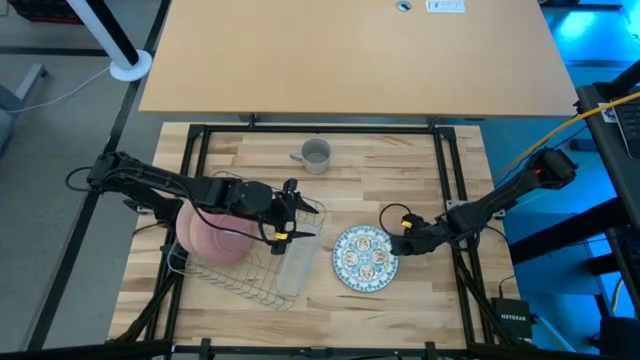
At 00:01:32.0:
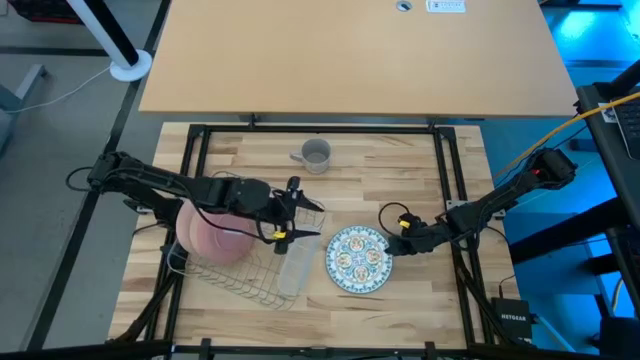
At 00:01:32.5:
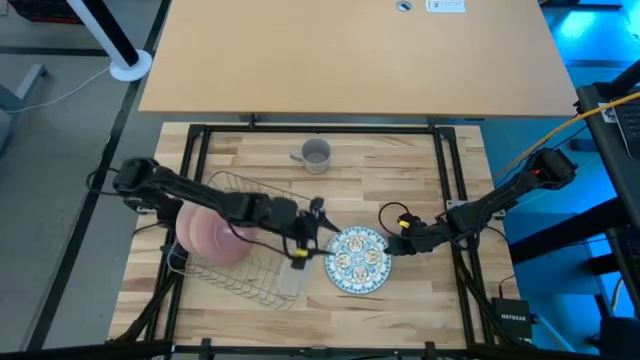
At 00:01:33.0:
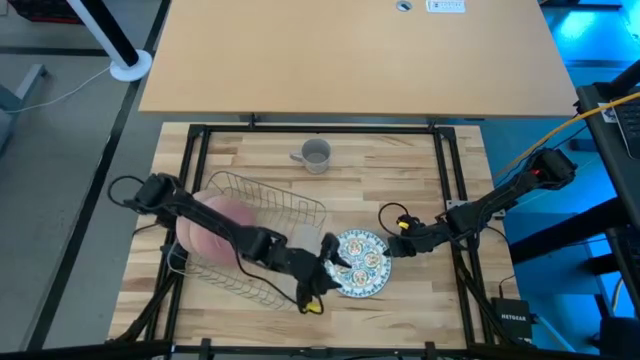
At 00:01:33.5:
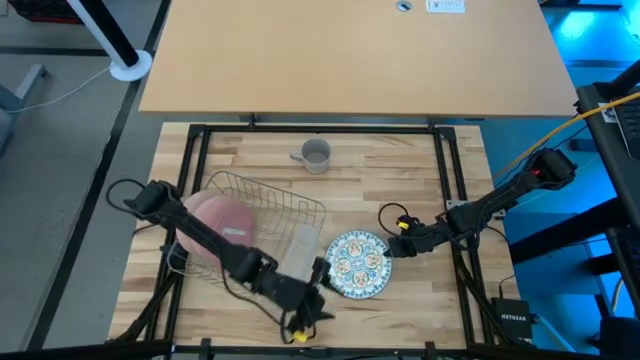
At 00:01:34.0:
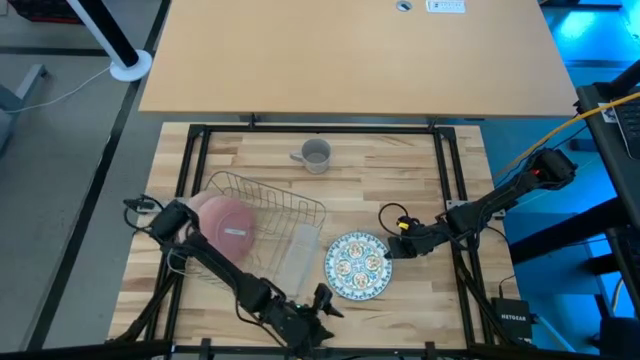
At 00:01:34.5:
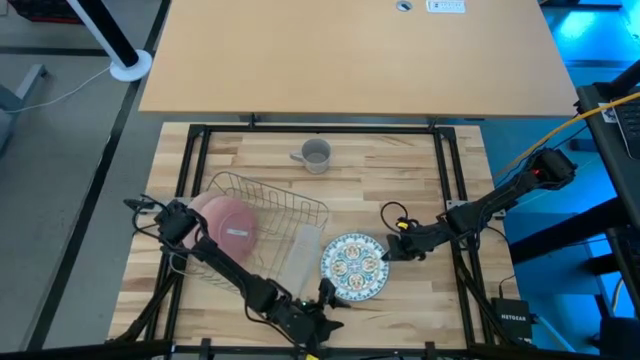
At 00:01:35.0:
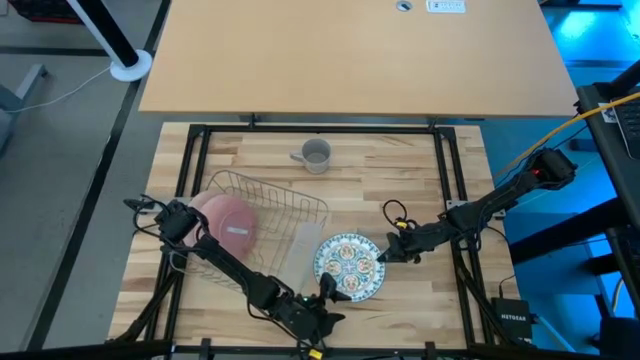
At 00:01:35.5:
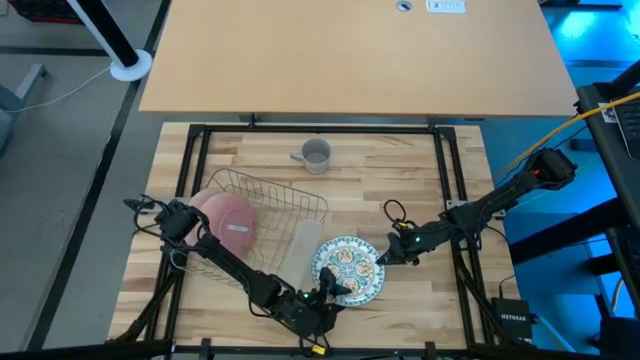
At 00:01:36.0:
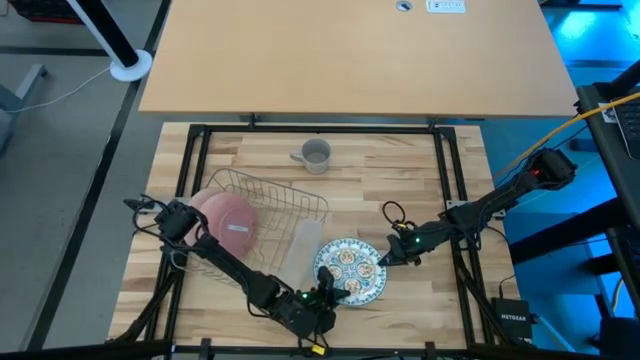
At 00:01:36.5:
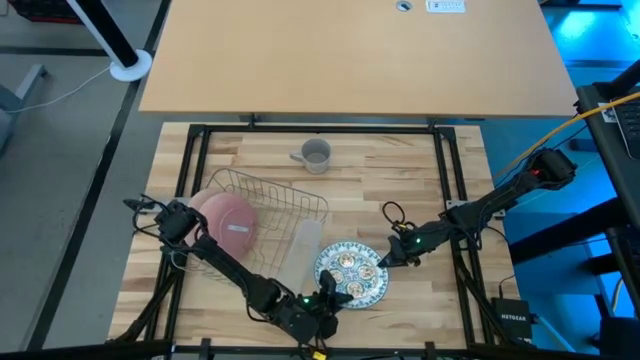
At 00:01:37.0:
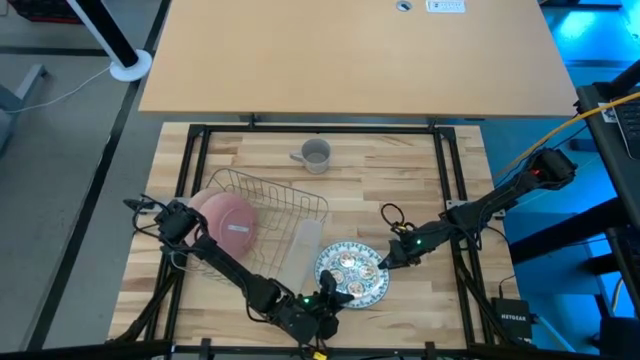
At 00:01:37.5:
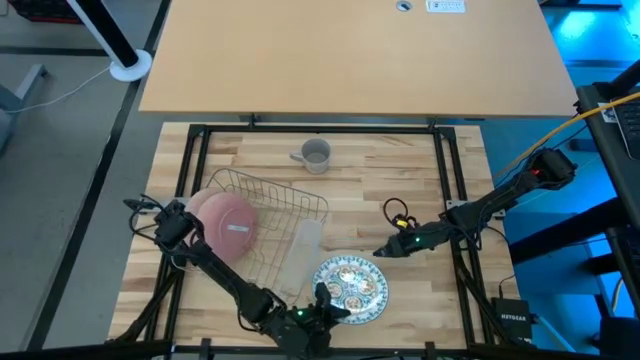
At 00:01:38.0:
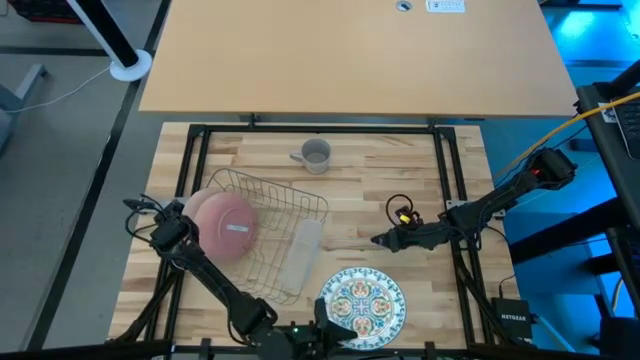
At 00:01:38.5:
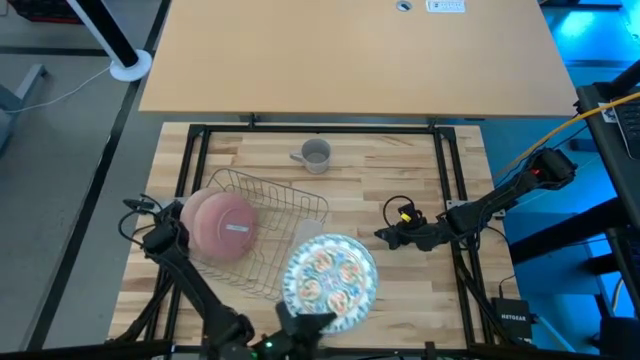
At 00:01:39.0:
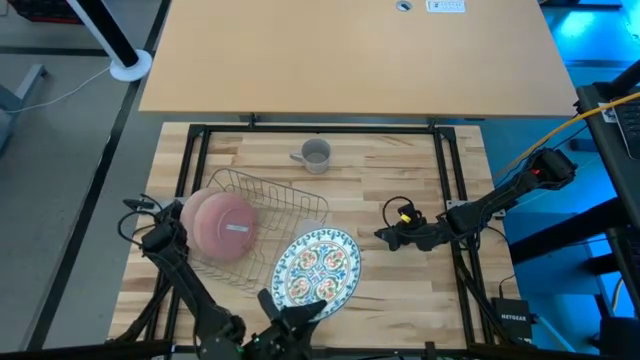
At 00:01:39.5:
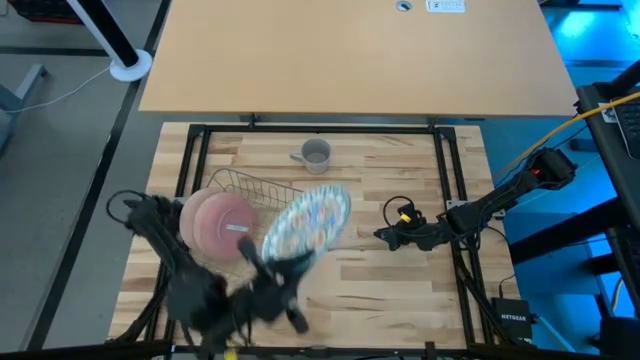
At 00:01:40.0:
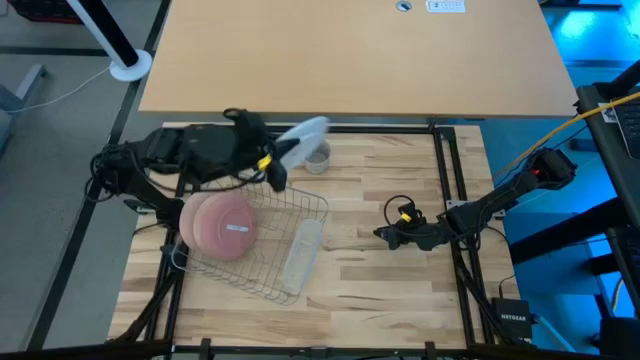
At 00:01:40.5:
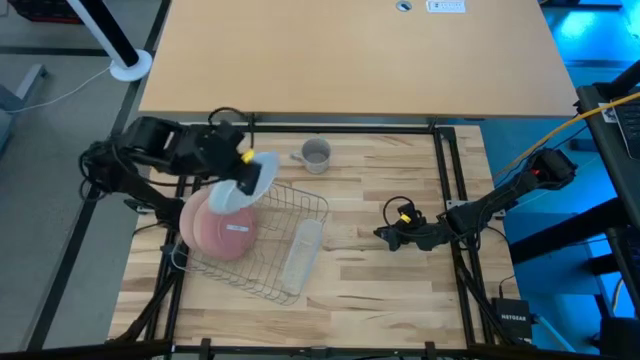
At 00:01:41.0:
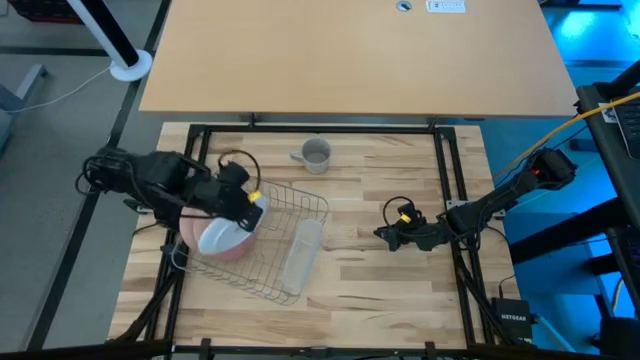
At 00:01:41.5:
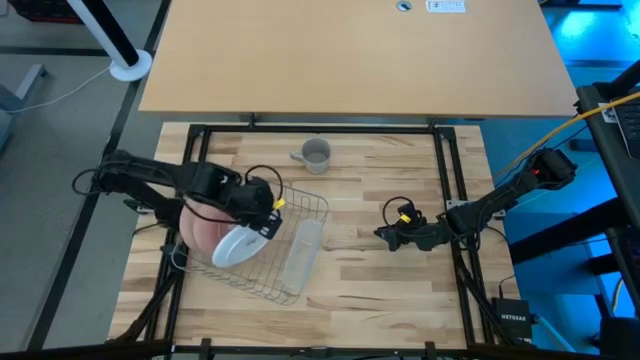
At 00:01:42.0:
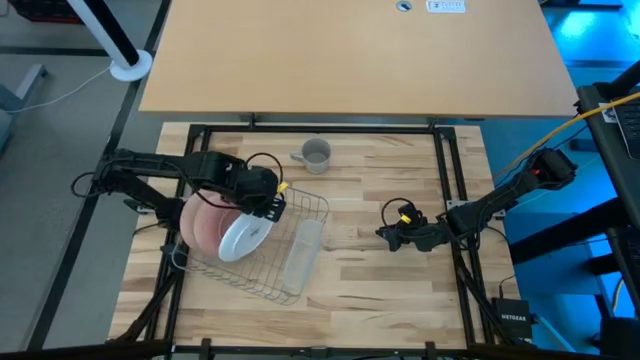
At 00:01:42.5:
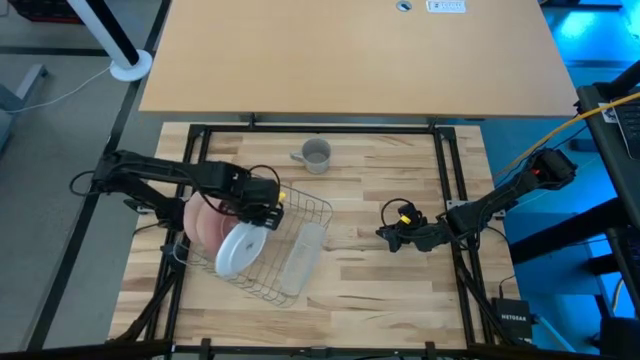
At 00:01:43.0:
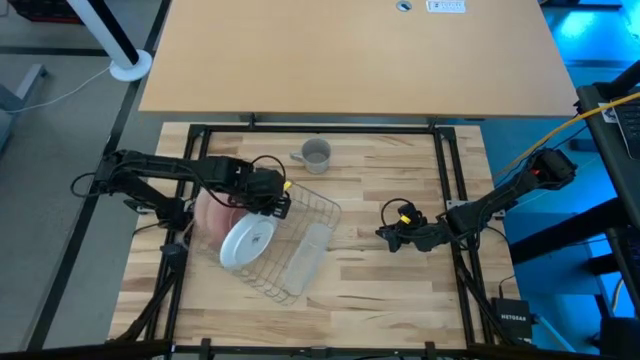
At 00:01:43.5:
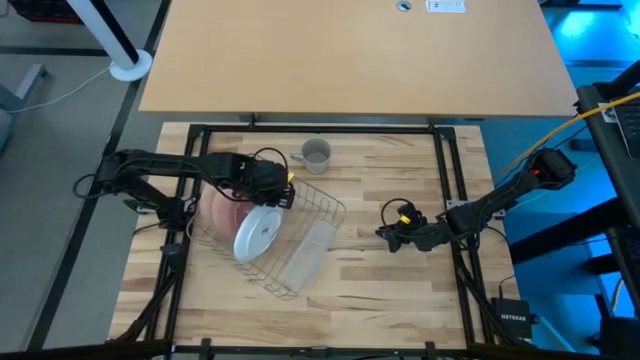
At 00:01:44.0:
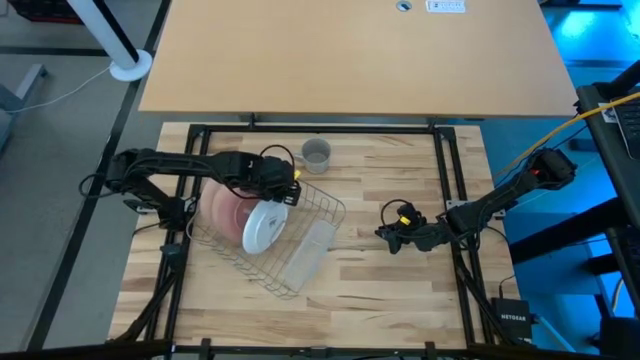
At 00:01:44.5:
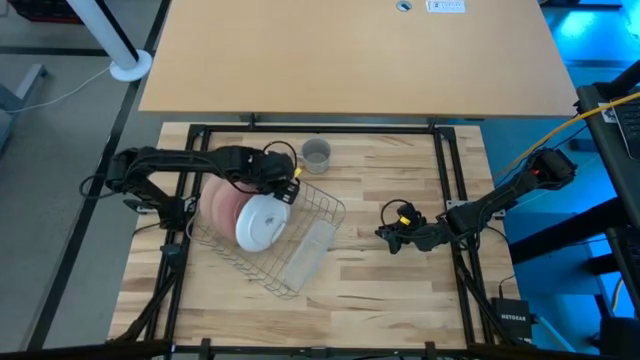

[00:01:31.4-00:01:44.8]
Task: Sort dishes
Put the white-blue plate in the dish rack

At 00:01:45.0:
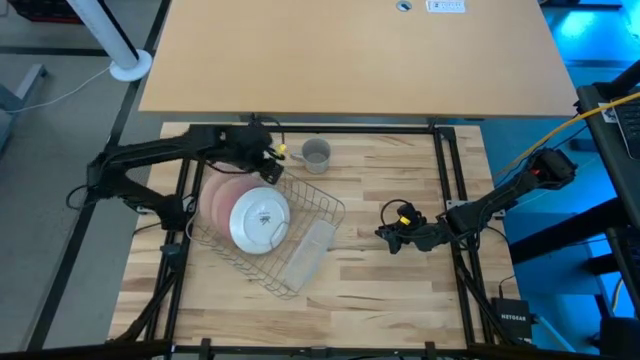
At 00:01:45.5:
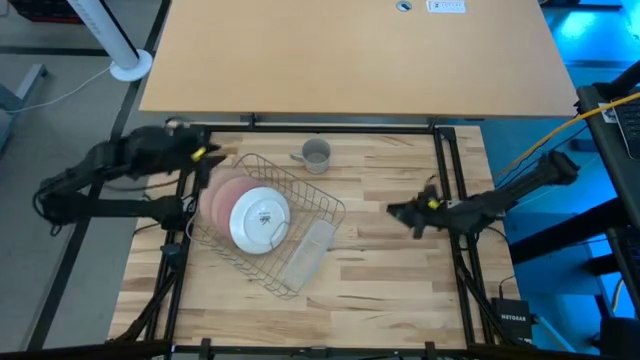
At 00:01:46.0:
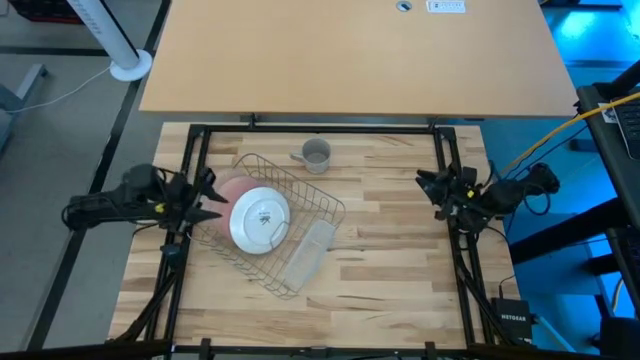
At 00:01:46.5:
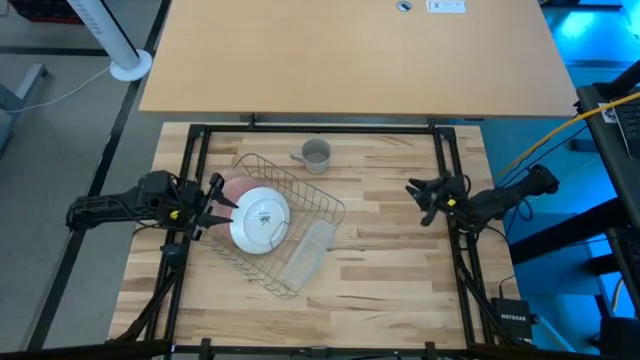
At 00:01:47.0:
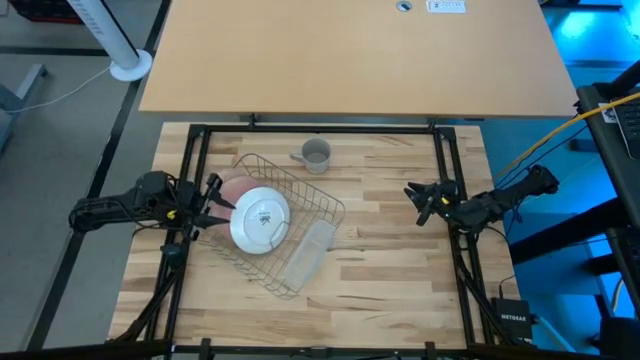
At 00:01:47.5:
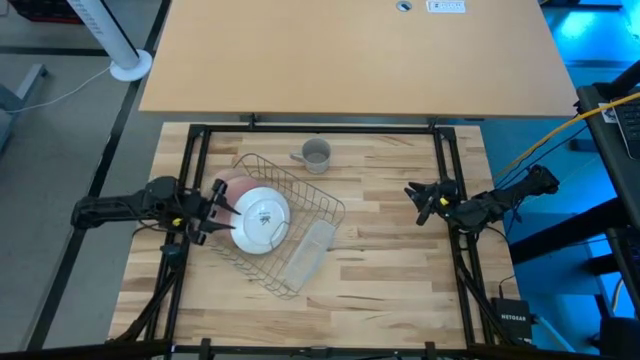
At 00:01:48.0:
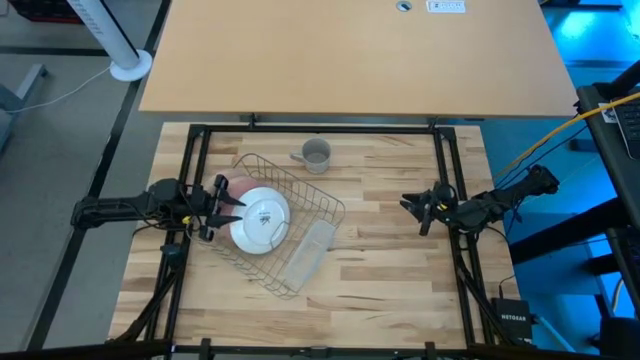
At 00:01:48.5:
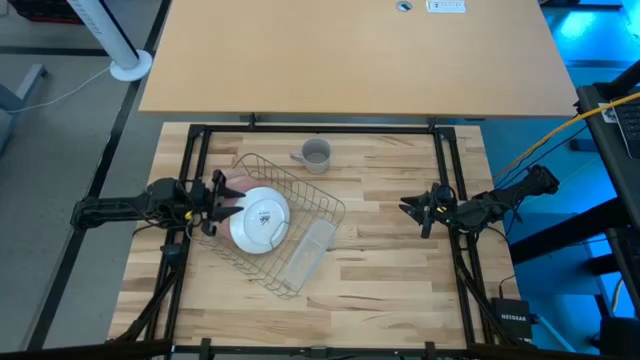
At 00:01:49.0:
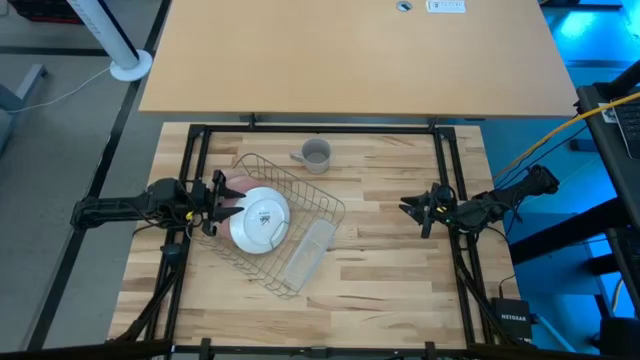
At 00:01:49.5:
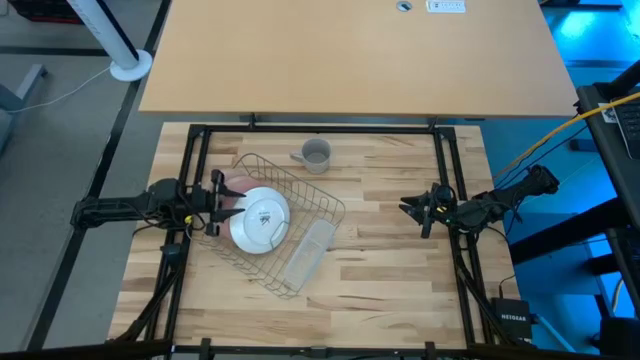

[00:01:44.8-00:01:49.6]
Return to Home Position

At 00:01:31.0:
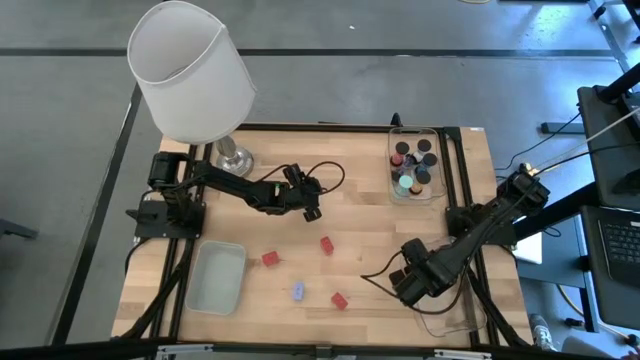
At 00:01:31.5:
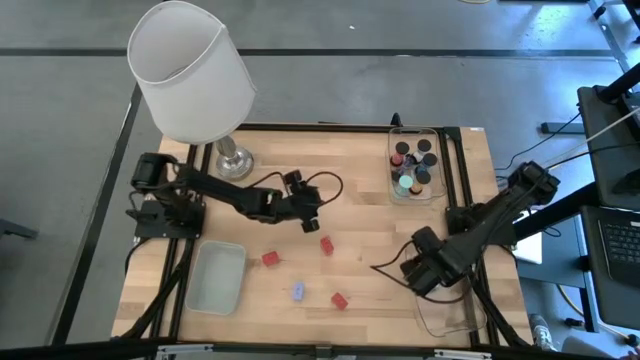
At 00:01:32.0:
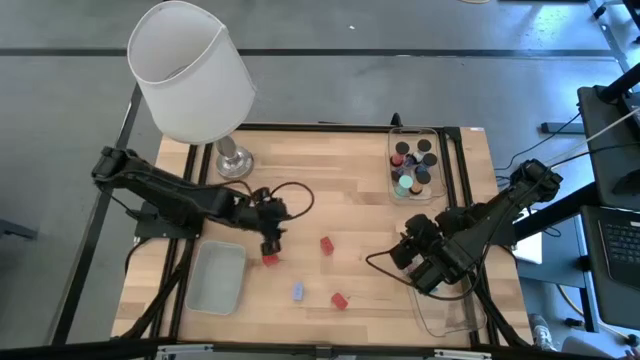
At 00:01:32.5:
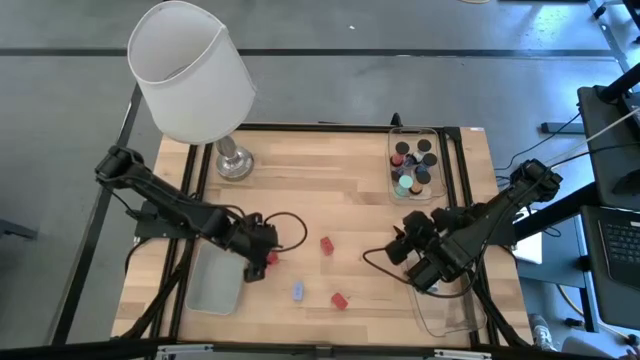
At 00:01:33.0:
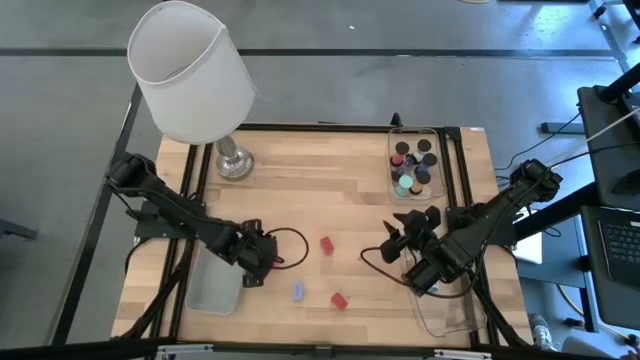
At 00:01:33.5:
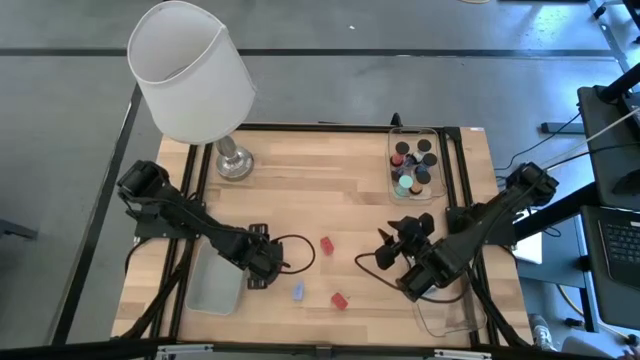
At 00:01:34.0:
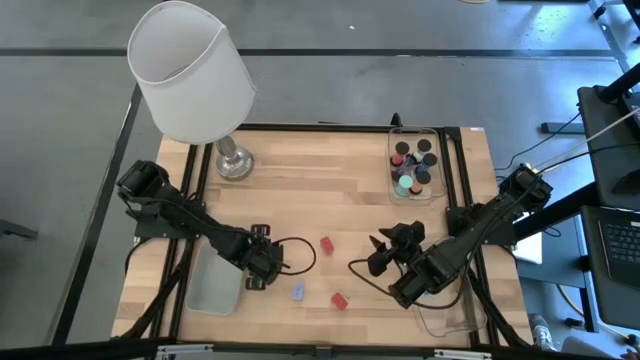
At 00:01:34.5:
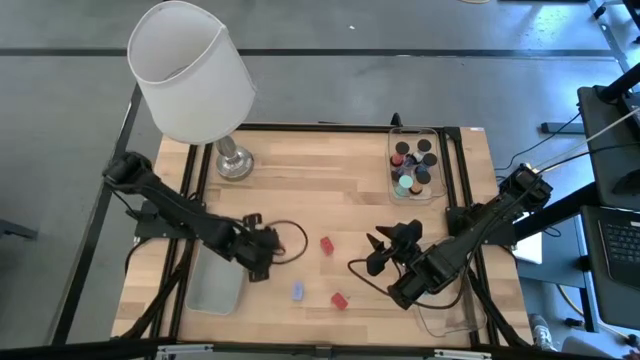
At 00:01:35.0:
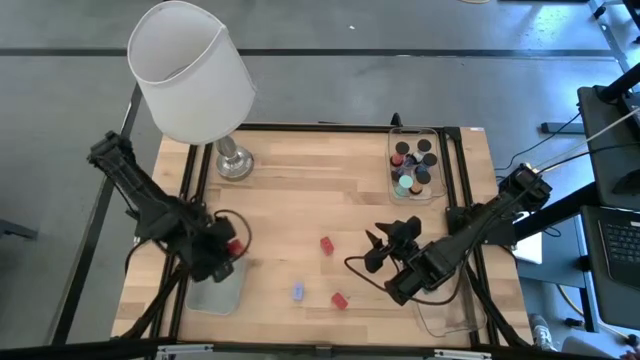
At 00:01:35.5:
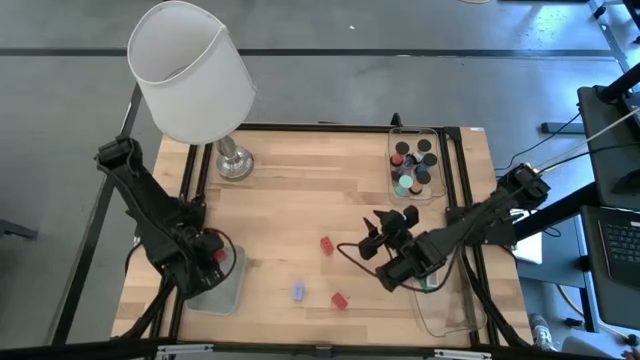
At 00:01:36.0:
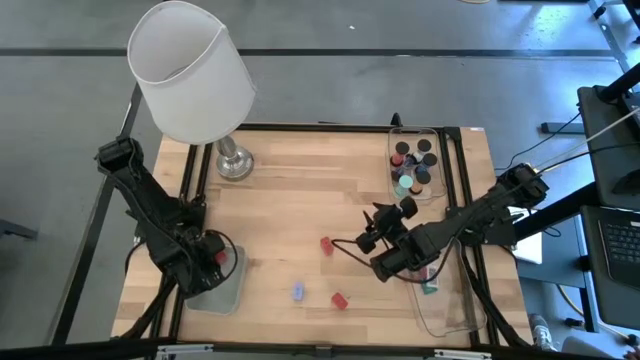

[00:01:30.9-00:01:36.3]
Task: Pick & Place Office items
Put the left orange charger adapter into the white bin
